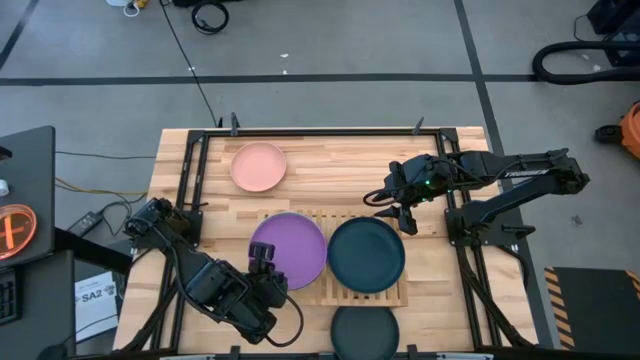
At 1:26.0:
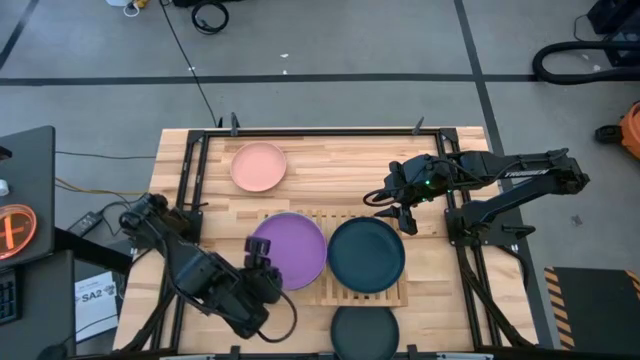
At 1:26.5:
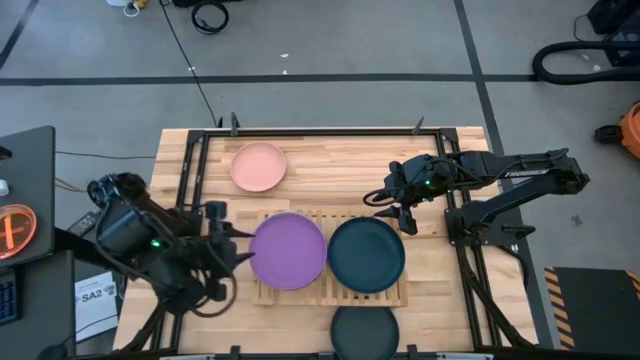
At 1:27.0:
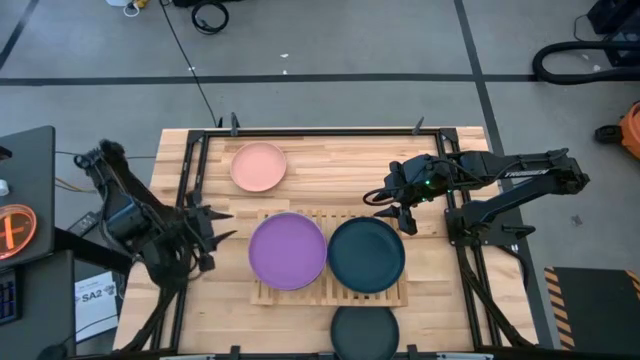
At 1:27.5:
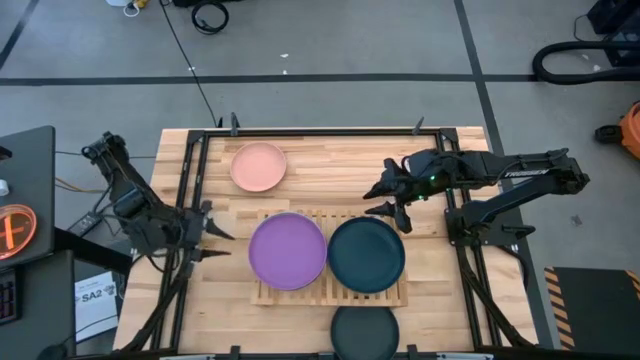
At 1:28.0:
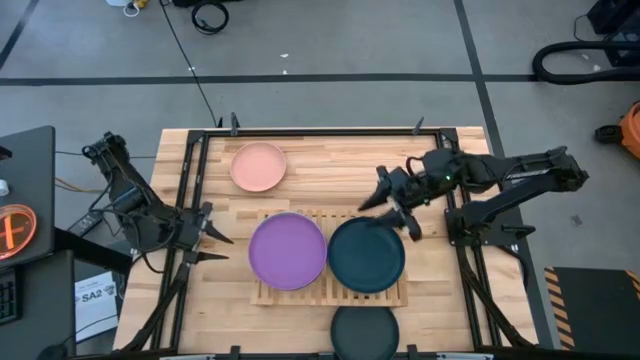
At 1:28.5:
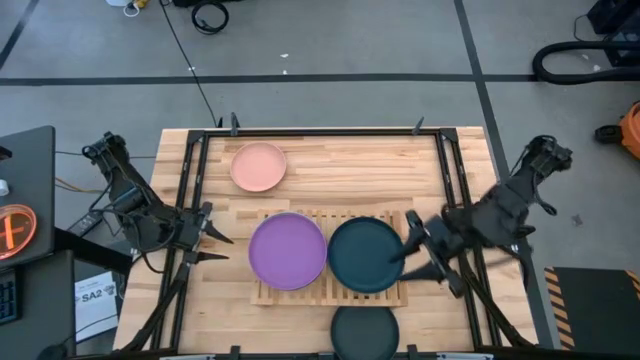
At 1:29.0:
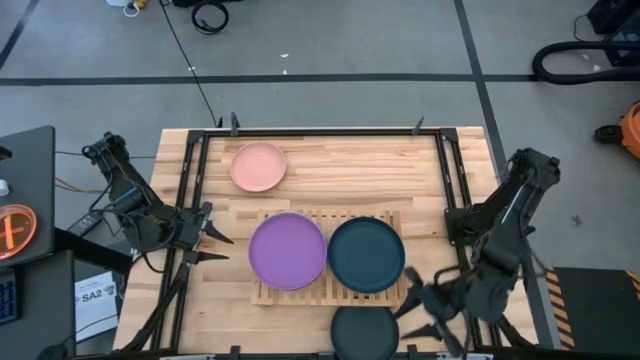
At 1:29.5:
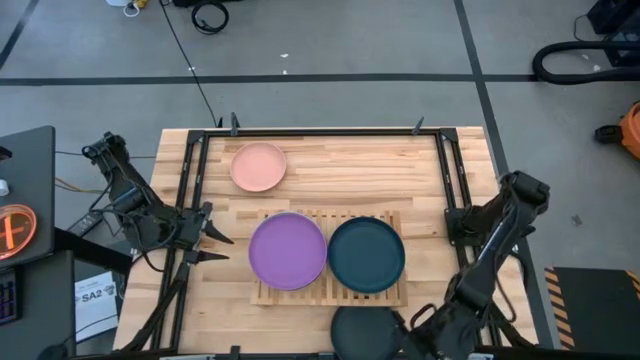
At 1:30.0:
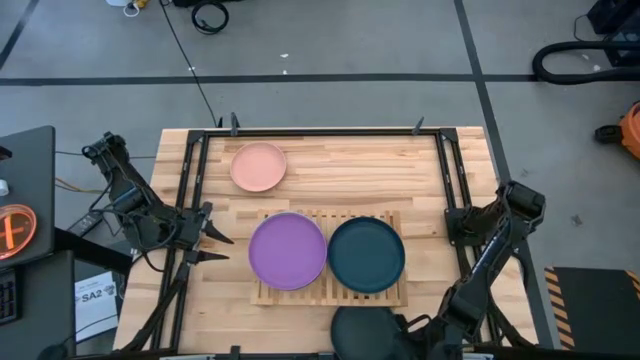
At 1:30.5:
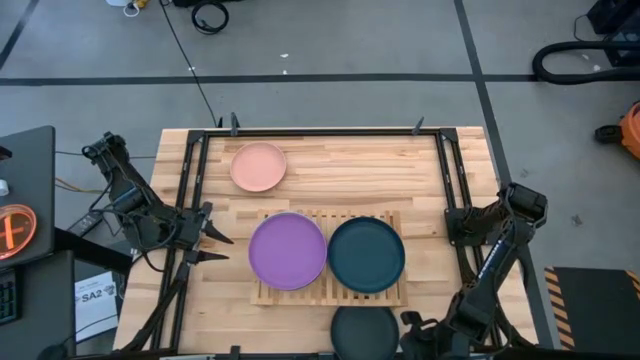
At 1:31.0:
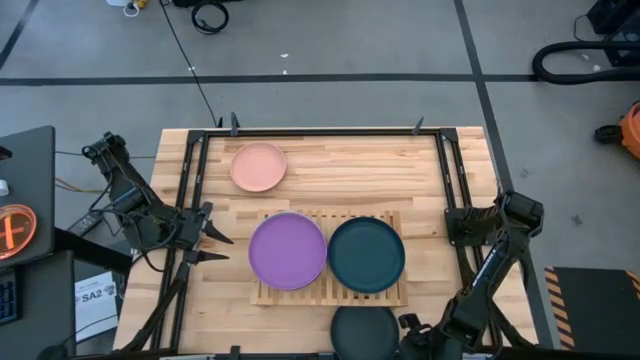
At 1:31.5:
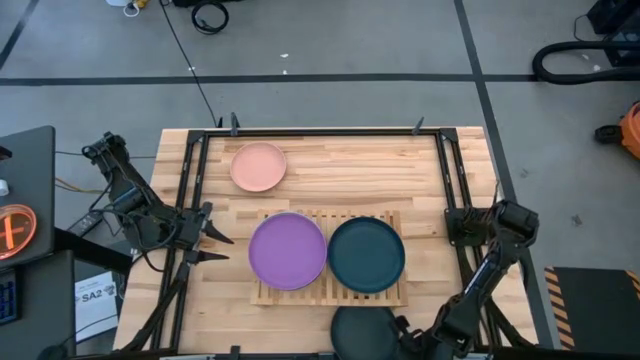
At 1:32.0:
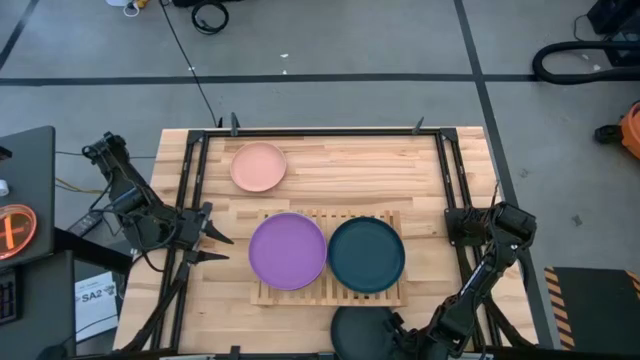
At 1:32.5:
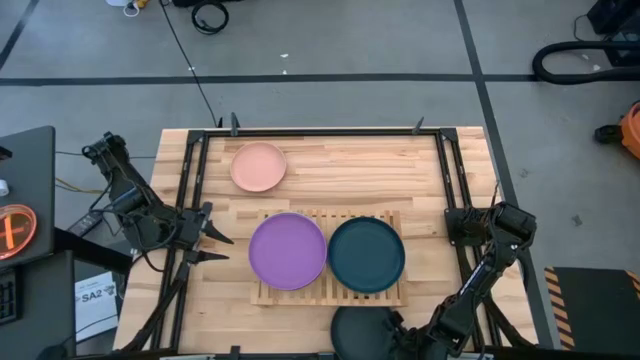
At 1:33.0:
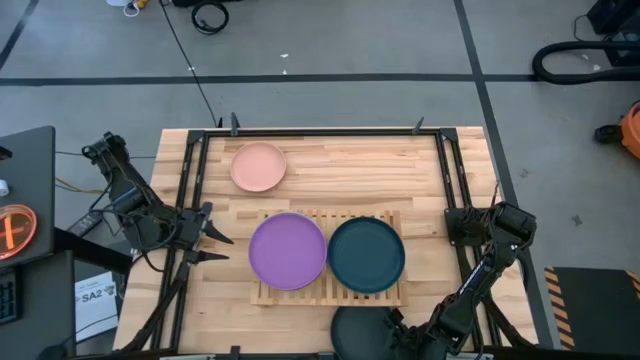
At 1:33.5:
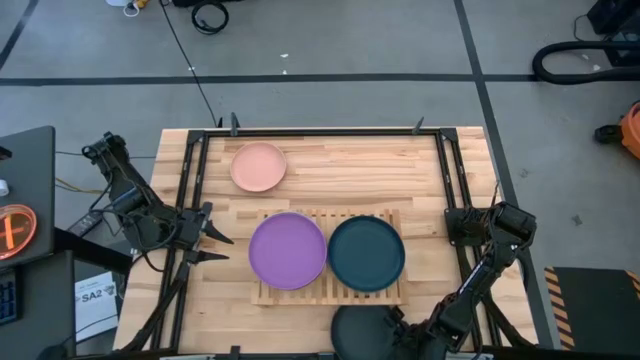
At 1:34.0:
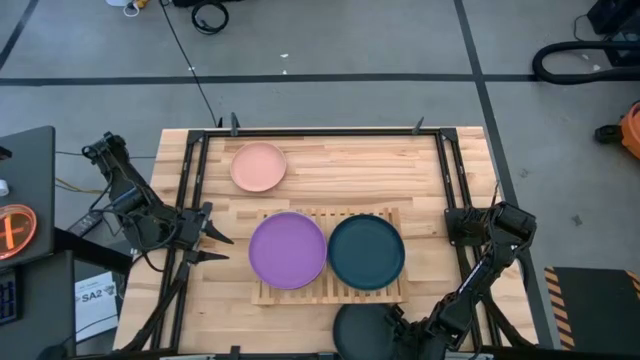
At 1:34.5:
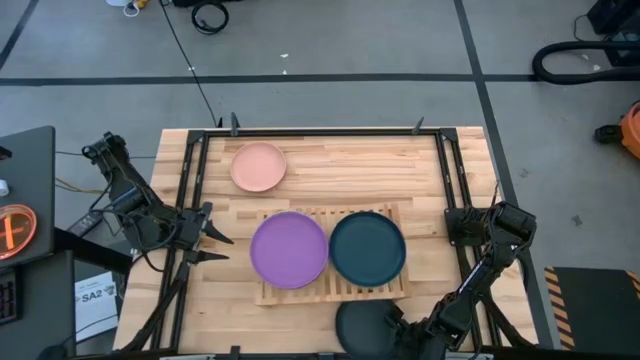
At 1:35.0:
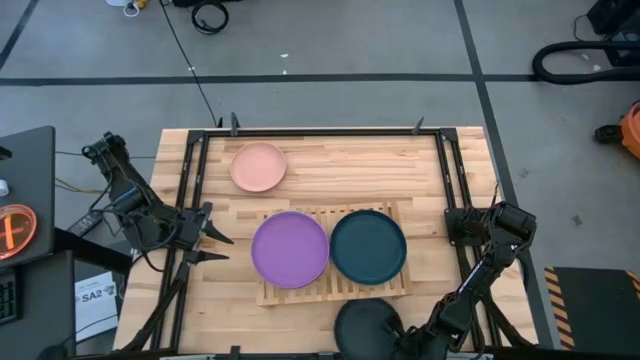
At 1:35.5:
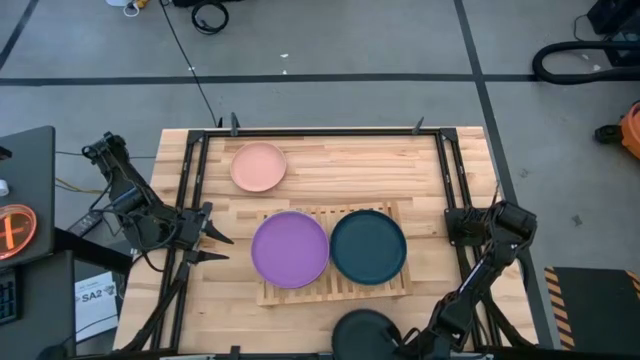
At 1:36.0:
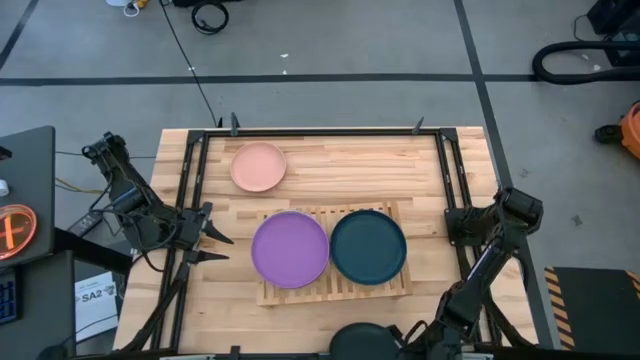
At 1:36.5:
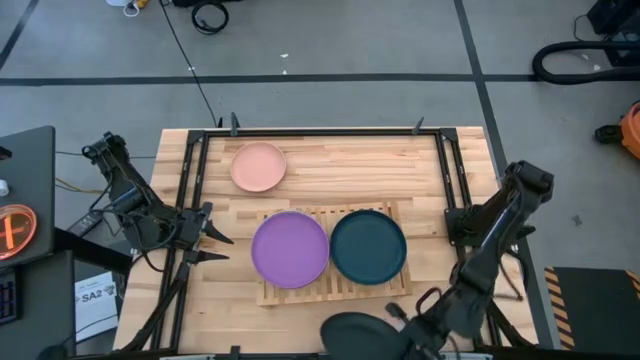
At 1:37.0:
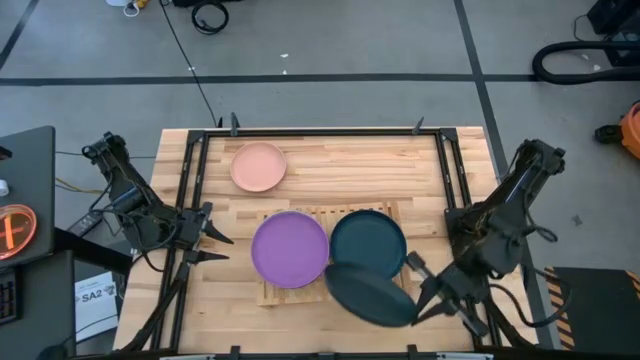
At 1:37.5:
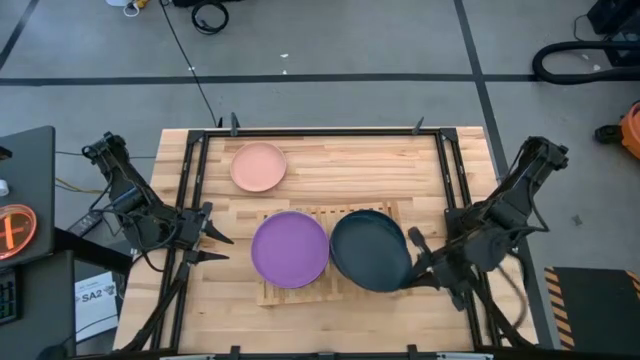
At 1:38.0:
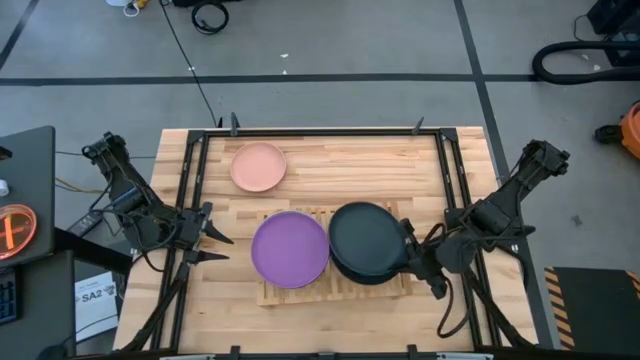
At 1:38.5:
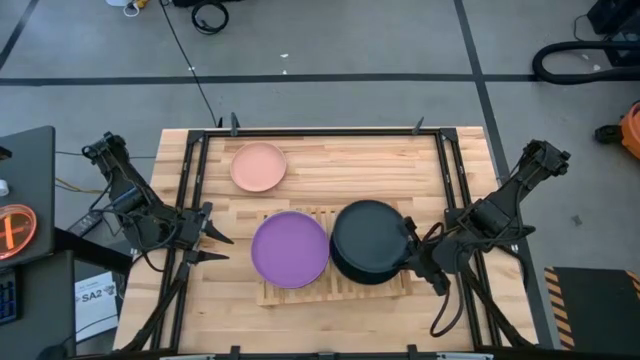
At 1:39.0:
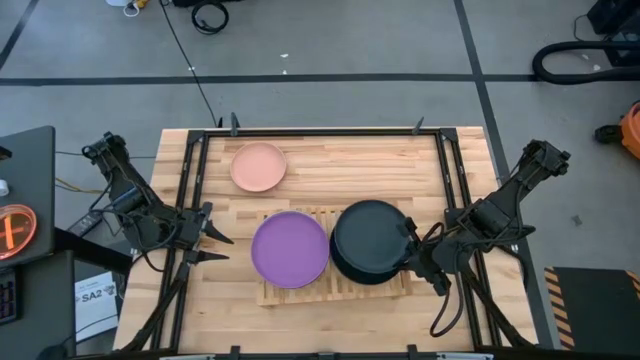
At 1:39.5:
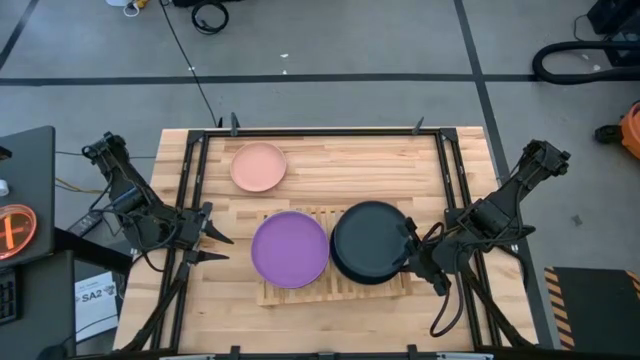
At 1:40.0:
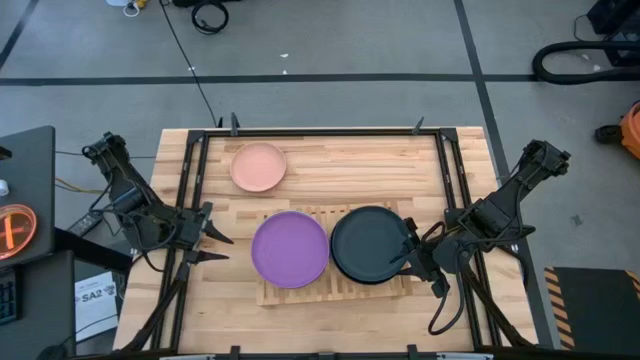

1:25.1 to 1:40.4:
Task: Place and stack plates onto a shelf
Stack the black plate on top of the dark green plate on the shelf

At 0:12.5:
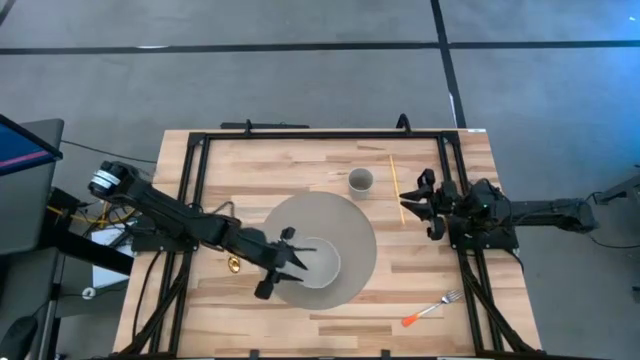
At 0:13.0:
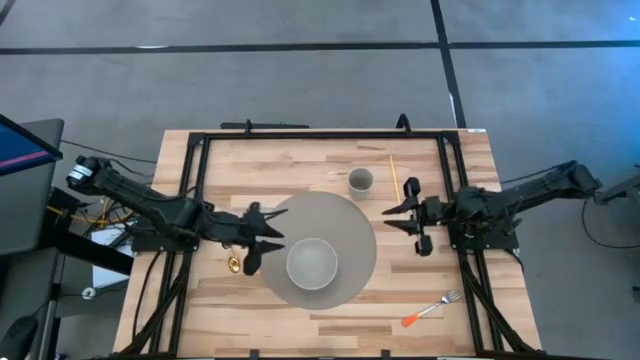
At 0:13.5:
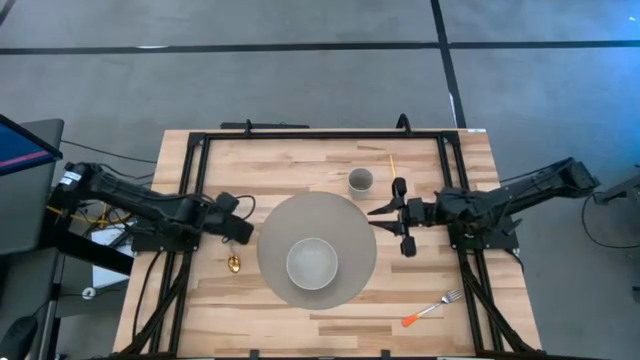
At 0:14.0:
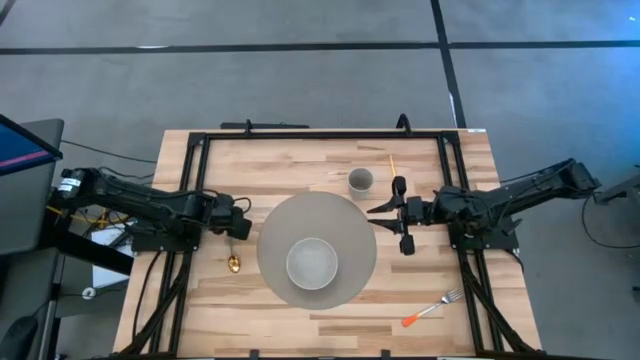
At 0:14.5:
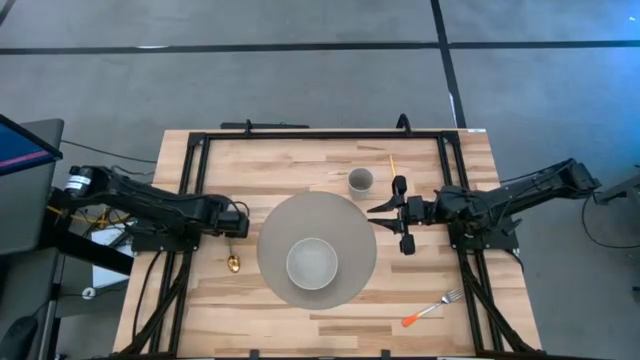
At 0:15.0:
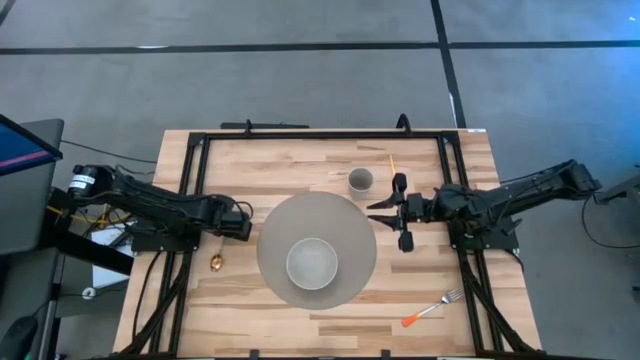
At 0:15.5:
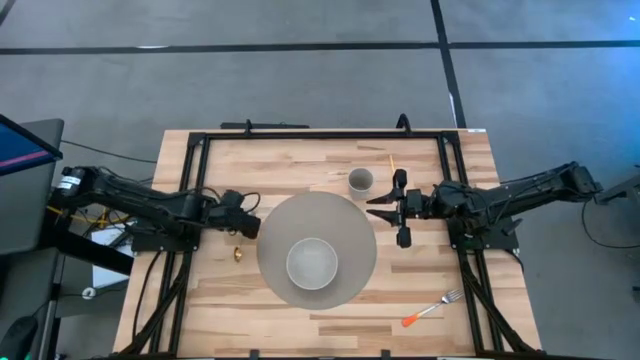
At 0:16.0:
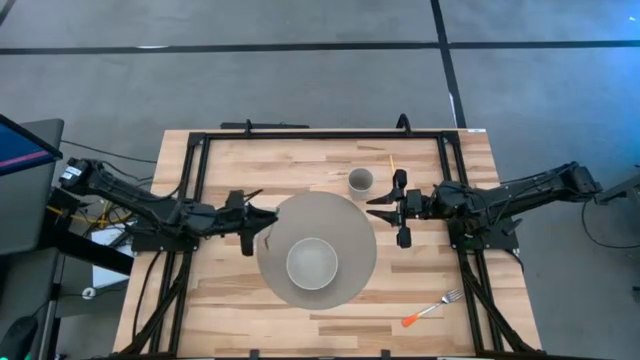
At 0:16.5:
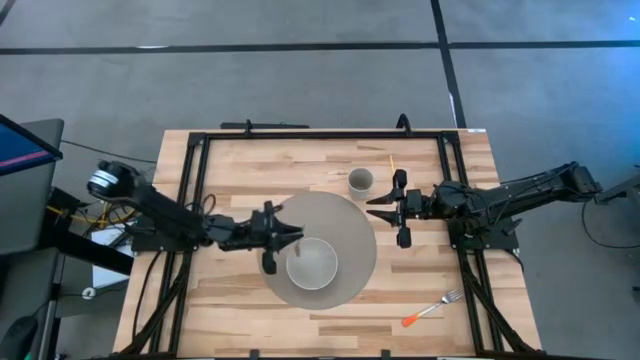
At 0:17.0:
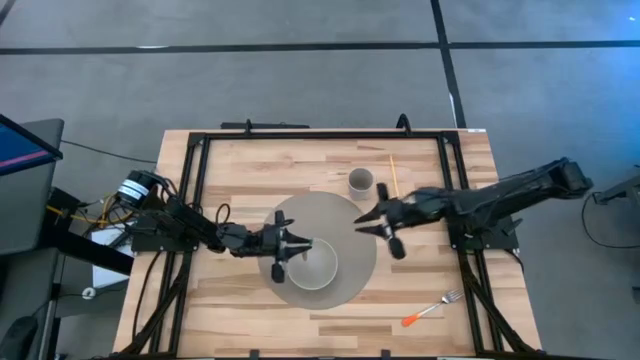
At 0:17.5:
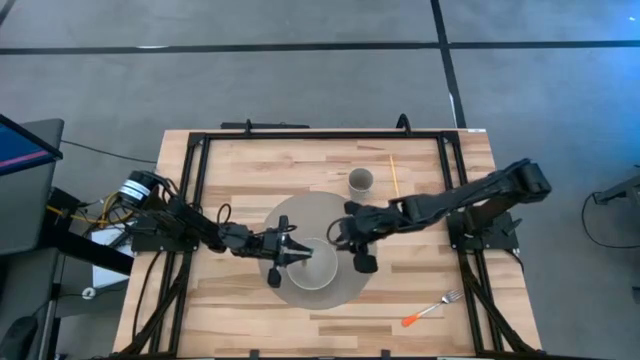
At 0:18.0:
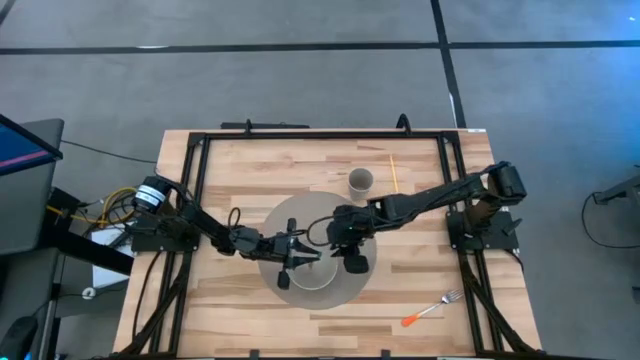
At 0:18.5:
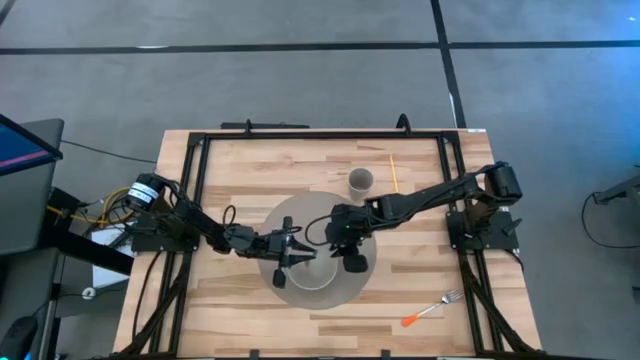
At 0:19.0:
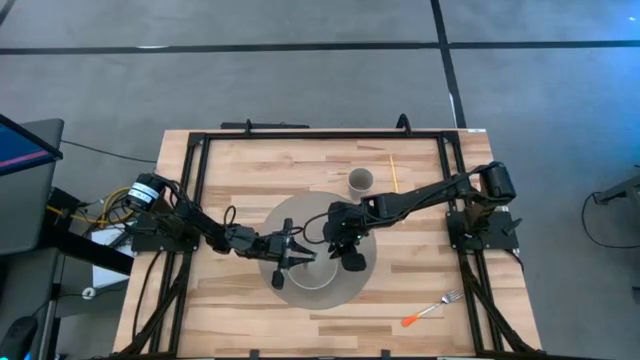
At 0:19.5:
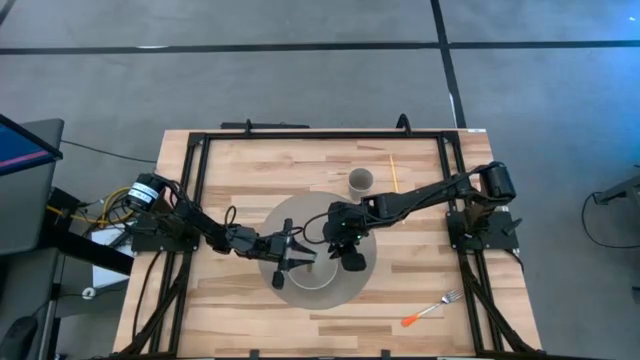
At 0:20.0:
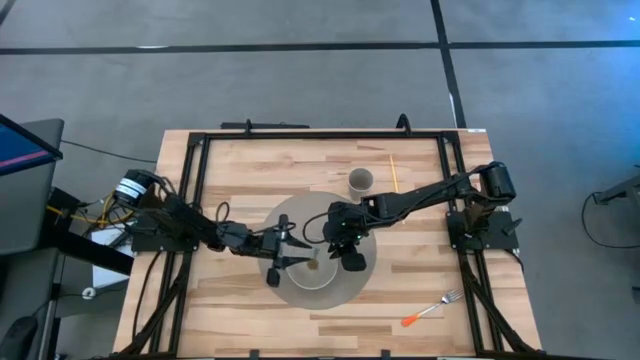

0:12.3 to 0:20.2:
Task: Pick & Place Utensil
Put the green spoon into the gray bowl
